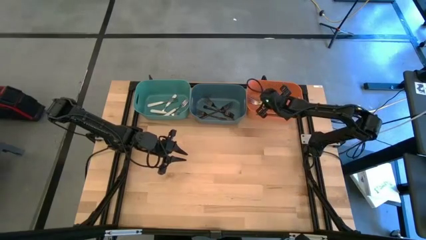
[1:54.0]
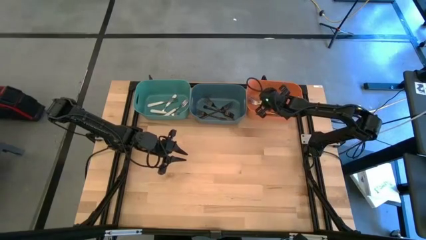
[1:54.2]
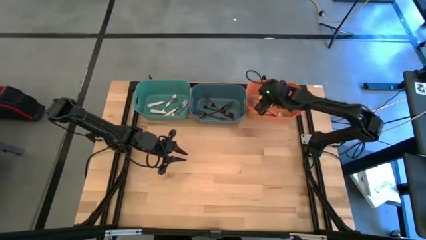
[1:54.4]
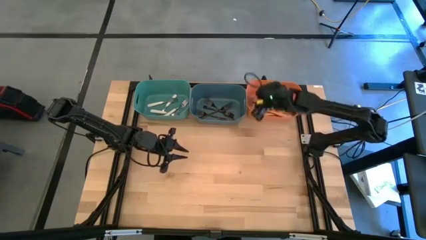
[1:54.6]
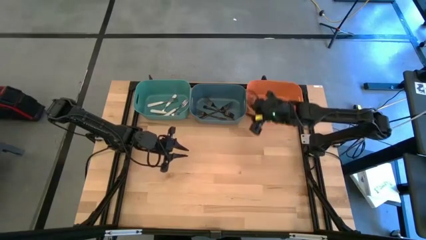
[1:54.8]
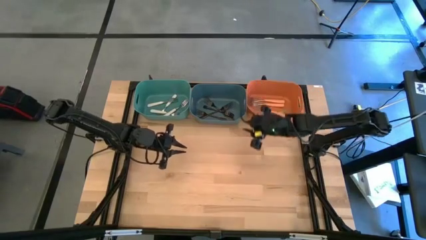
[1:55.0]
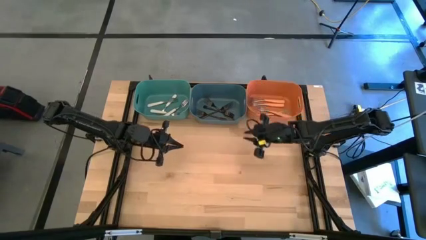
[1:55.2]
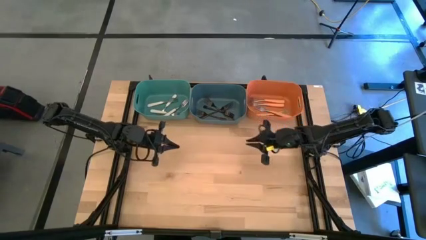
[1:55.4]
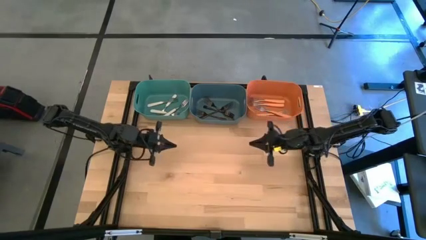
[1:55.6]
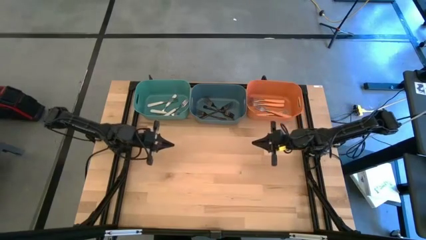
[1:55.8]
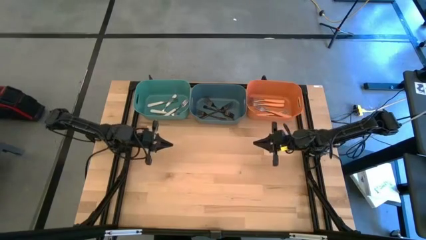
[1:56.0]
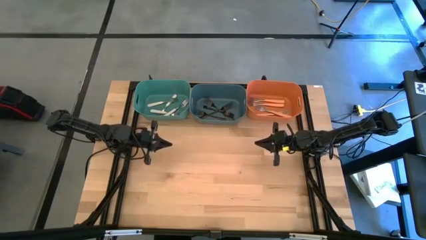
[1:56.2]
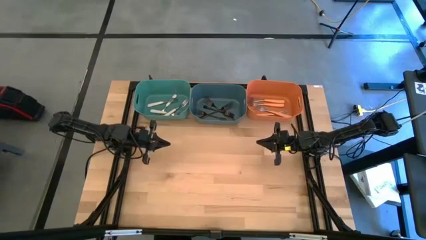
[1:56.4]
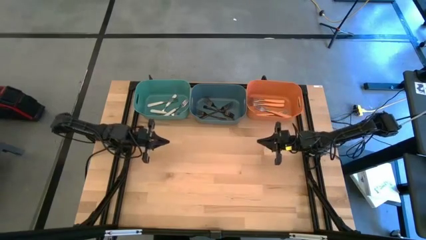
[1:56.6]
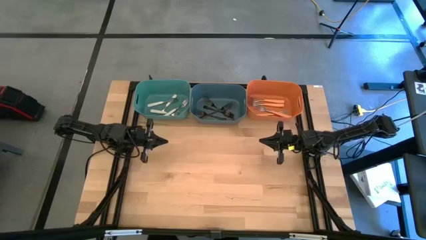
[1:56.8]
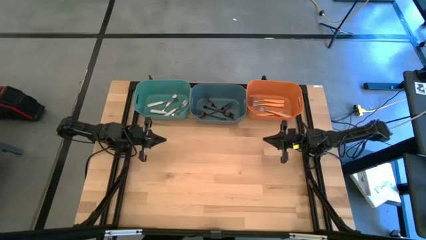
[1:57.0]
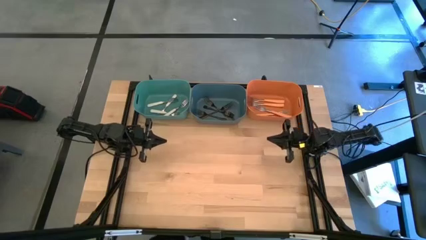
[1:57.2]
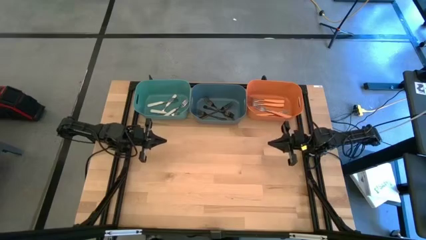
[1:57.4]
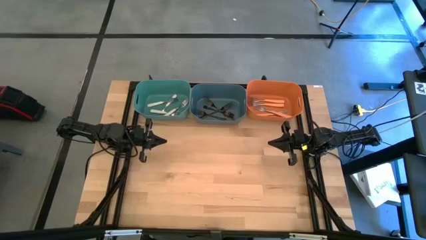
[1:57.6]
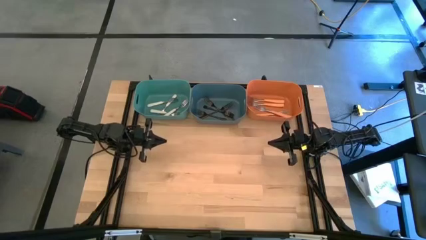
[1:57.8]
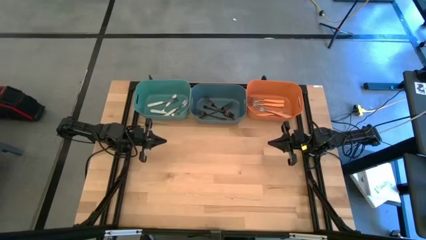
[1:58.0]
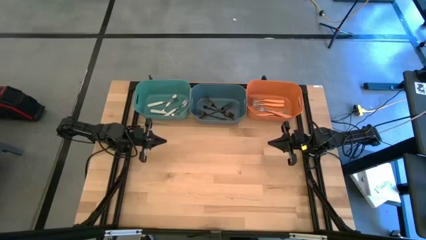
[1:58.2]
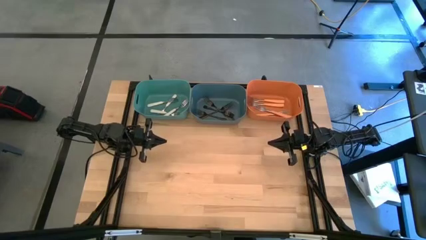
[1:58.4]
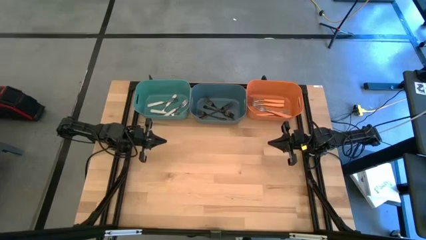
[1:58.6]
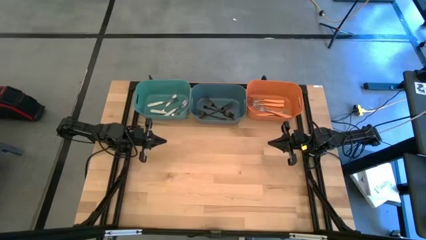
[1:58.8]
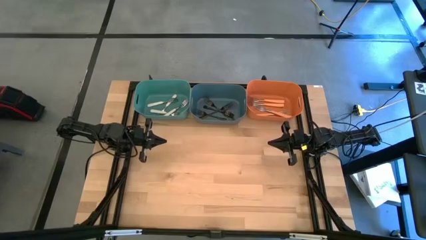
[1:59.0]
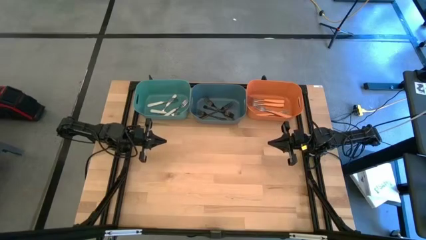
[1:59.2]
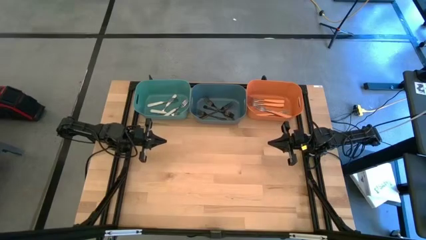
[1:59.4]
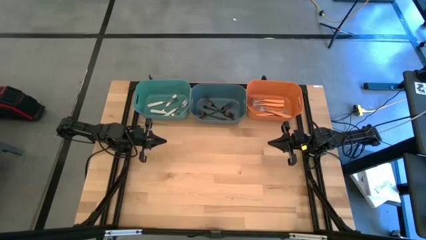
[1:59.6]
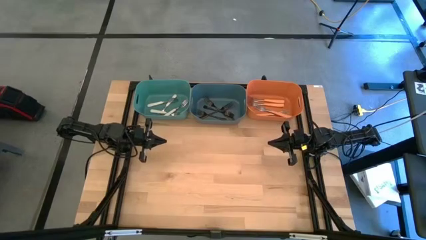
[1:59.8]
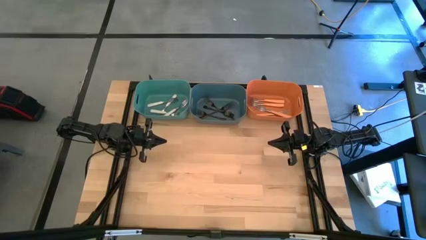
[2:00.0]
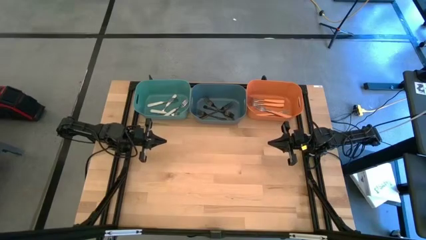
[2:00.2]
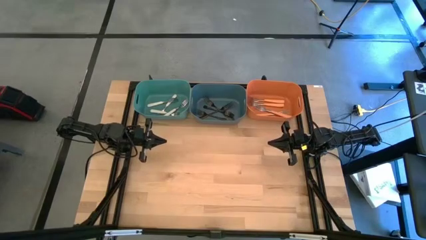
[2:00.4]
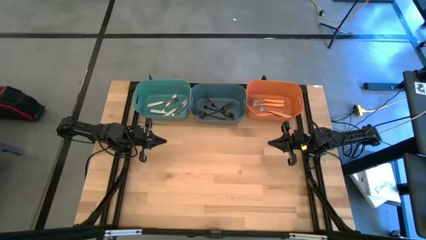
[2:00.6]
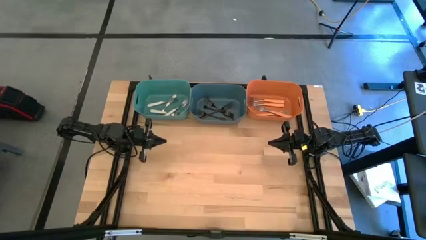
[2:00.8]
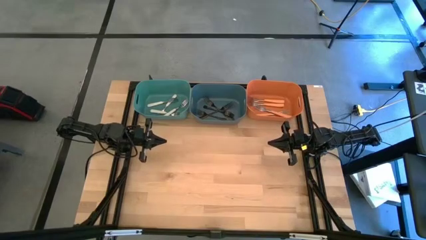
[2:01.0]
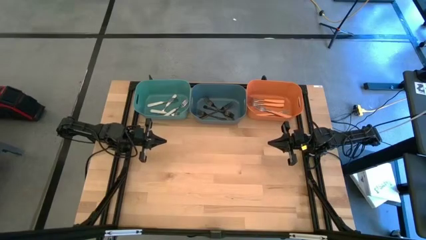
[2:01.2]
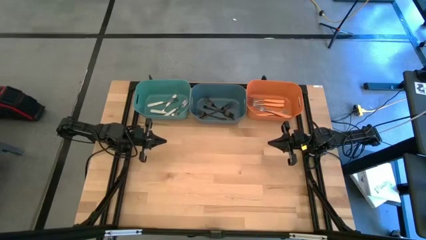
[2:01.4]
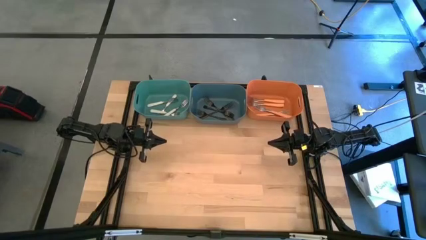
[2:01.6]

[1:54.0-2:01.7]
Task: Sort silverware by color (type)
Return to Home Position

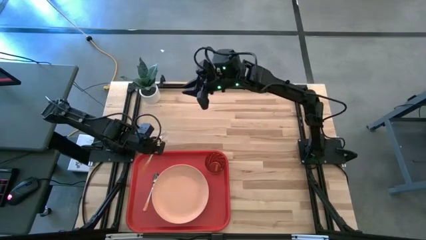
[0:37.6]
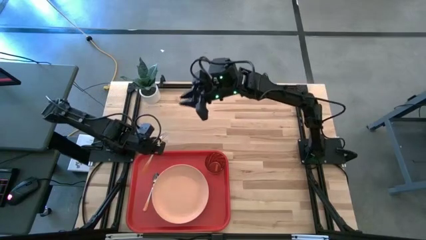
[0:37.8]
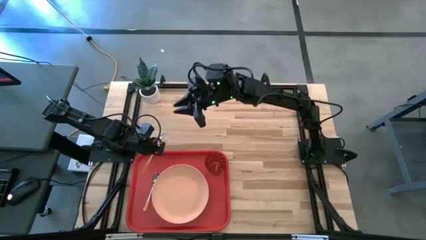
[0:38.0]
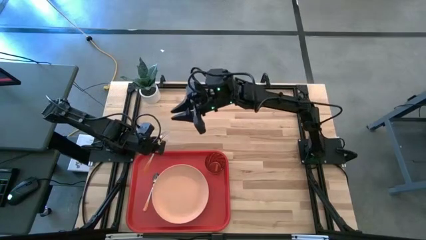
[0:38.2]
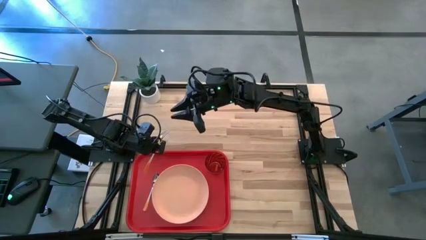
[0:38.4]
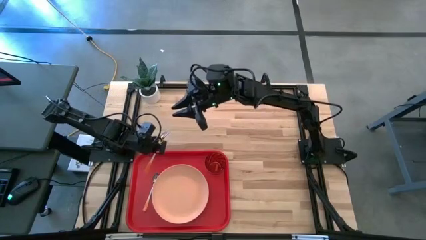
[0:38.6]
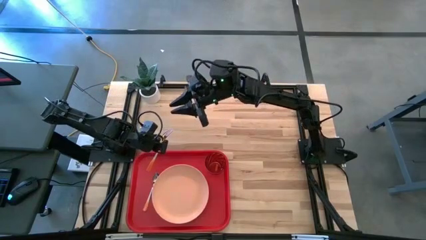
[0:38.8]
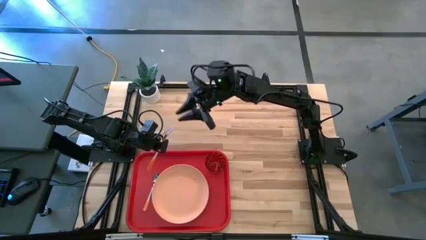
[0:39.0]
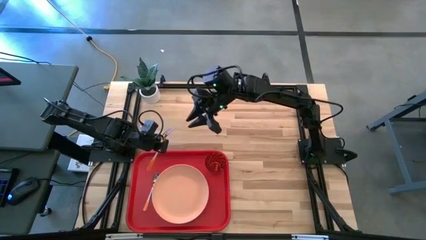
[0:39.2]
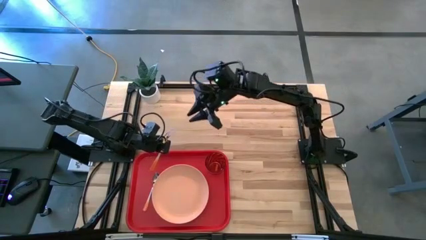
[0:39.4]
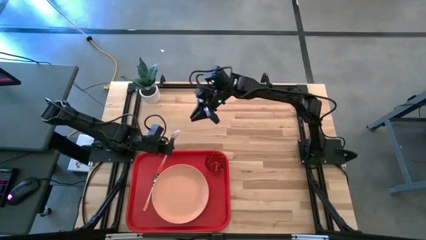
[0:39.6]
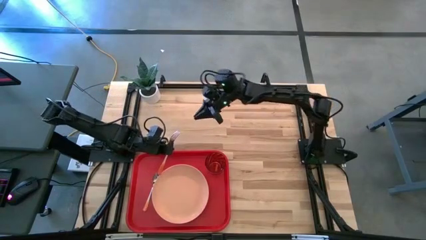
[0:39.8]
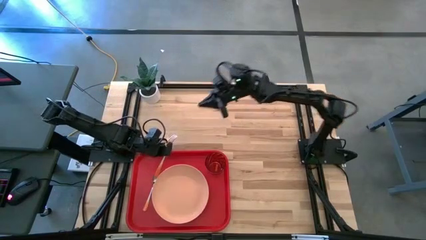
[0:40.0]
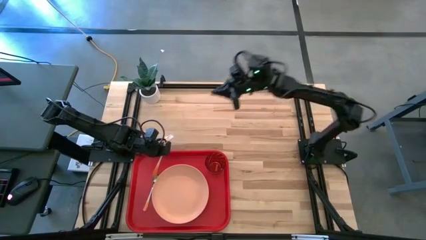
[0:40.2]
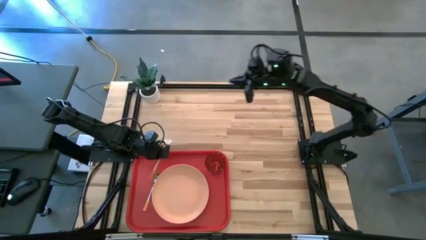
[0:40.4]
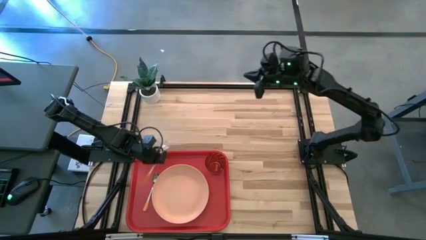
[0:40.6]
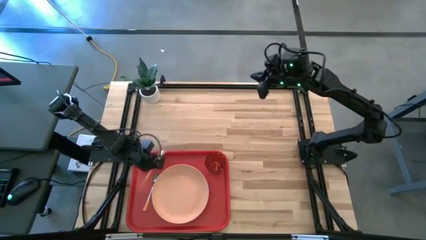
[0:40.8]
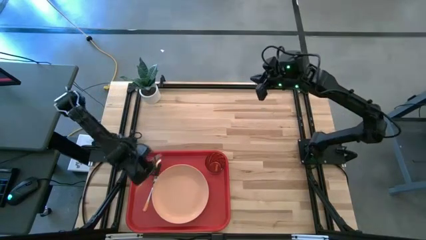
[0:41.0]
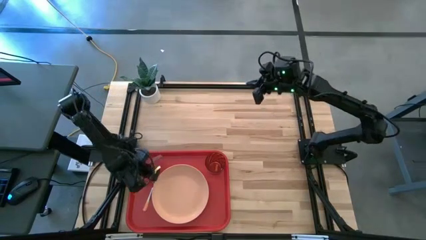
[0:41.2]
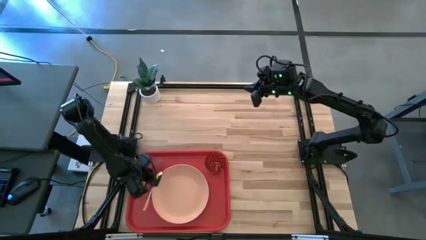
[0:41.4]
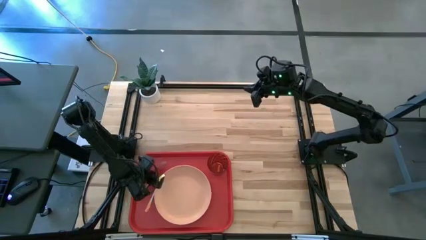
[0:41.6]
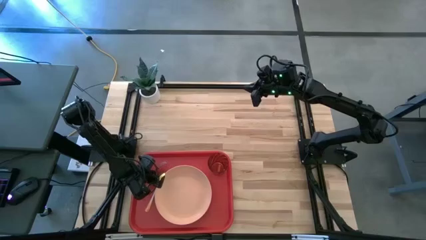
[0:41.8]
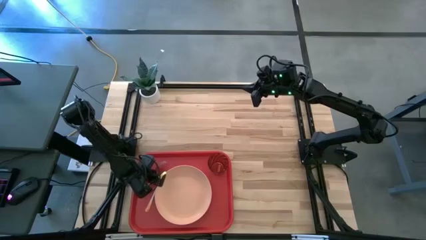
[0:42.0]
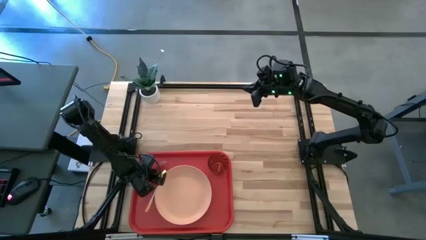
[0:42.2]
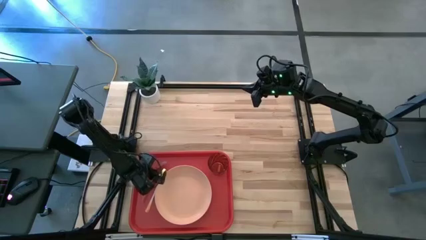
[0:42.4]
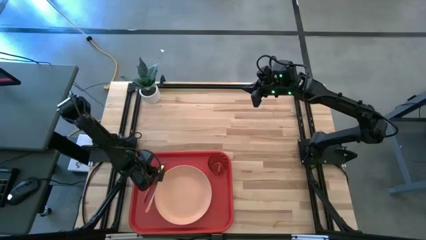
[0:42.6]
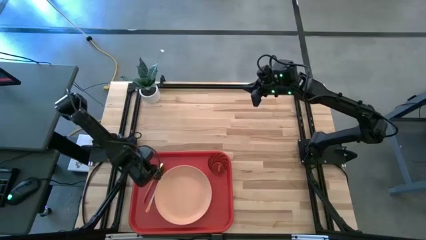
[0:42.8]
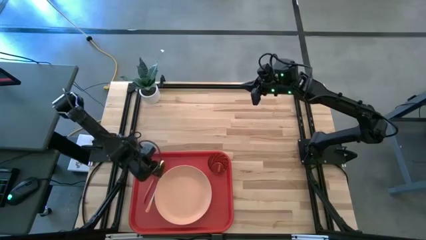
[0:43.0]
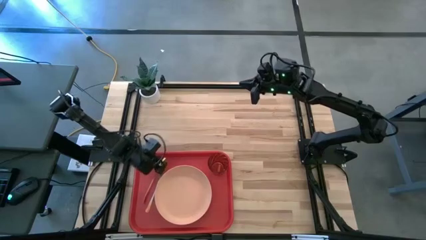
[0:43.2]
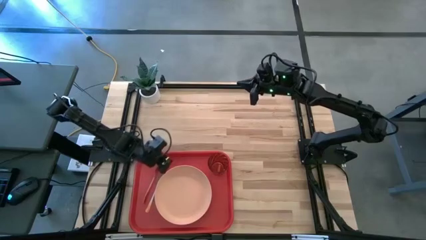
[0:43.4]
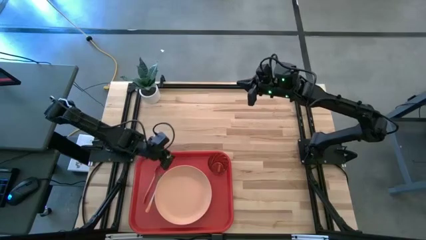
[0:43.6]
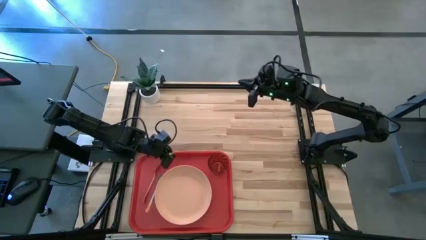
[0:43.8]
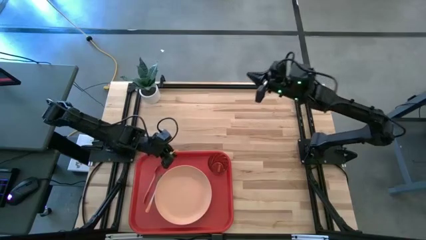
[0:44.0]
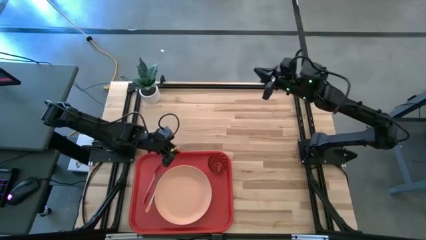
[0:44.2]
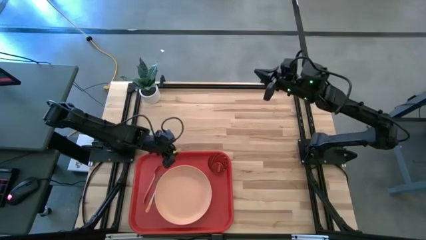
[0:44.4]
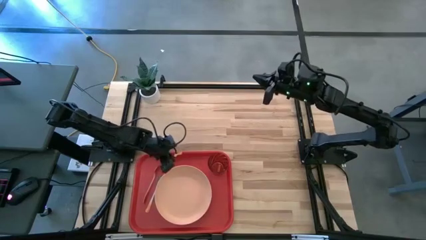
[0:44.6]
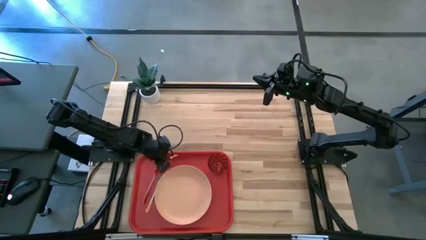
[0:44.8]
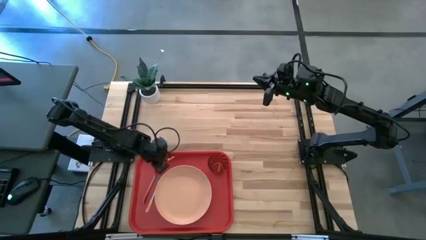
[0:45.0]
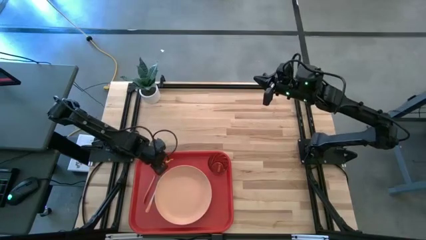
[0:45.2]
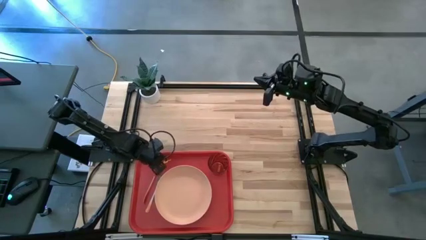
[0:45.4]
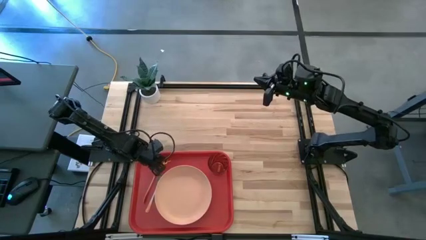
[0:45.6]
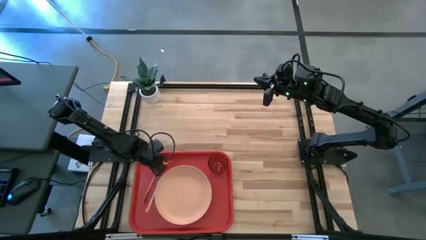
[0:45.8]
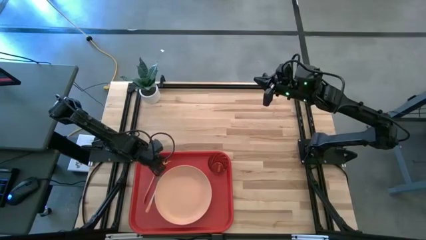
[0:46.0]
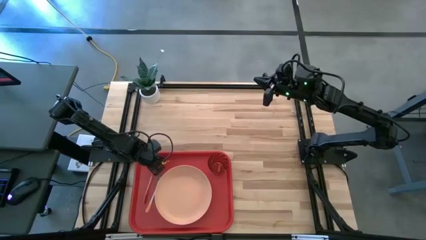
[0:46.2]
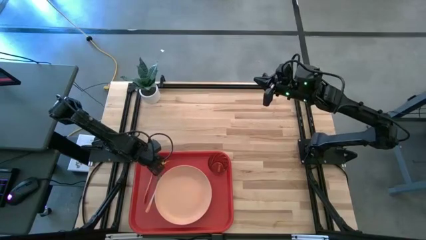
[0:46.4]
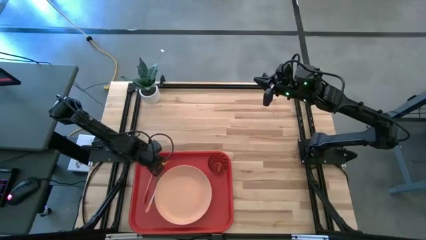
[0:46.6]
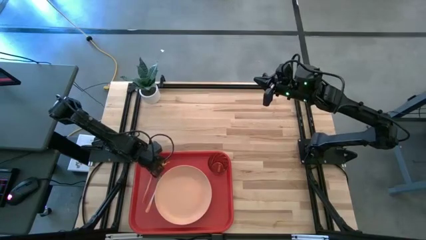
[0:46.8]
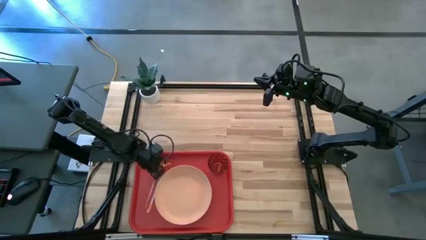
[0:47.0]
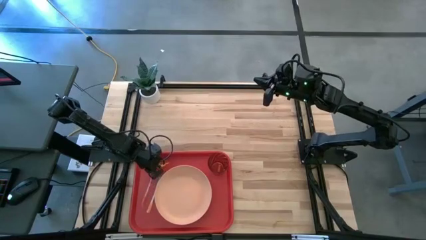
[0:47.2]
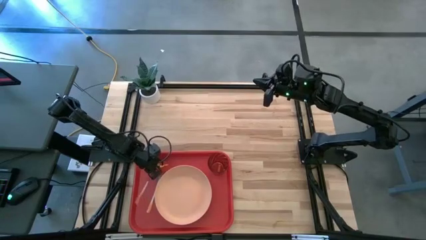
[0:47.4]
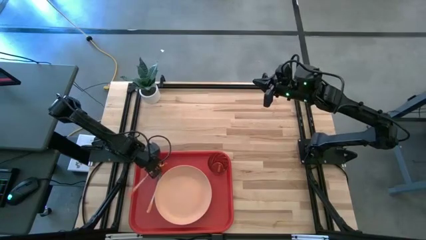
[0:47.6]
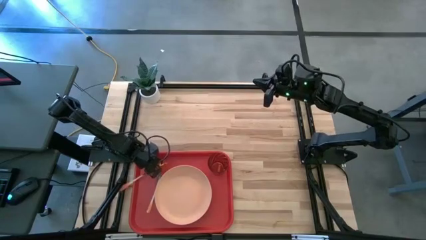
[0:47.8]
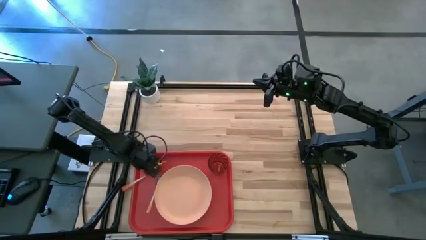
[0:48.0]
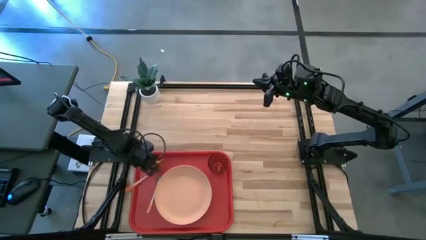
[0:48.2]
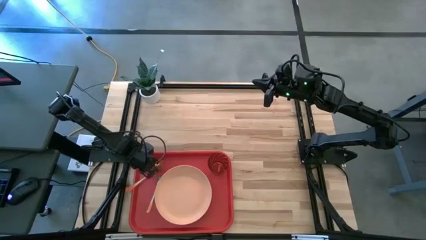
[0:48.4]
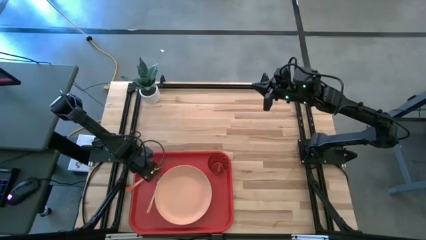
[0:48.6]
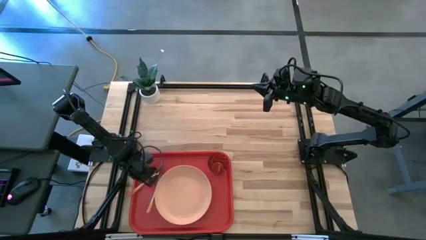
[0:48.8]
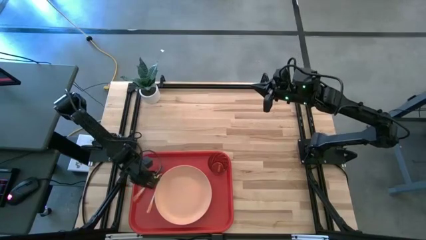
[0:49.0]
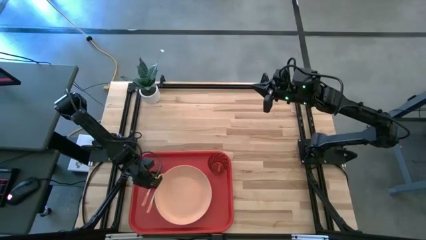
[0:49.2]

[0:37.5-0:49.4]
Task: Pick and place plate/cup/fork/spoon on tray
Put the orange fork on the red tray to the left of the orange spoon
